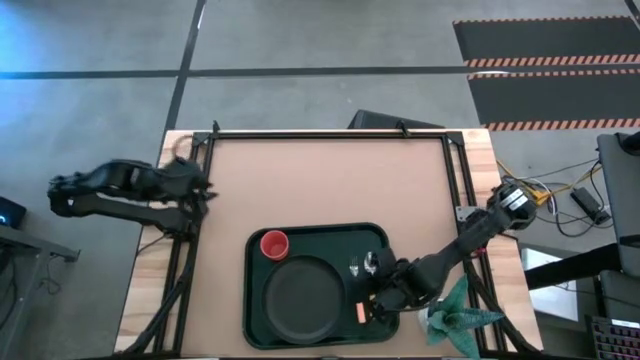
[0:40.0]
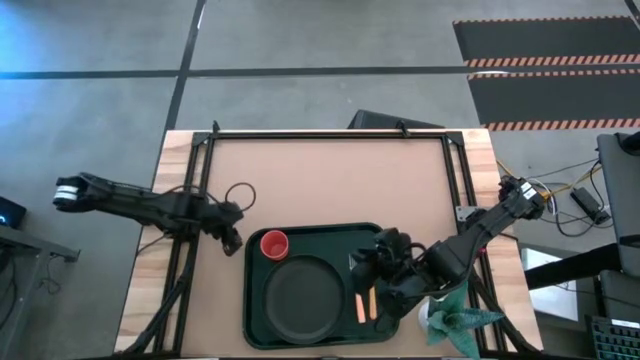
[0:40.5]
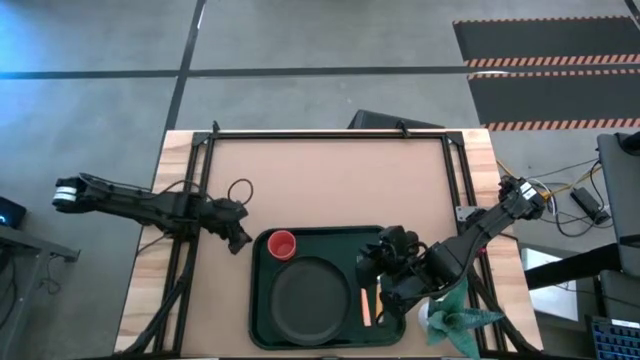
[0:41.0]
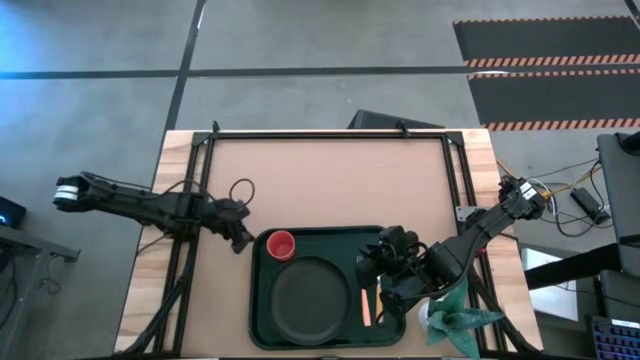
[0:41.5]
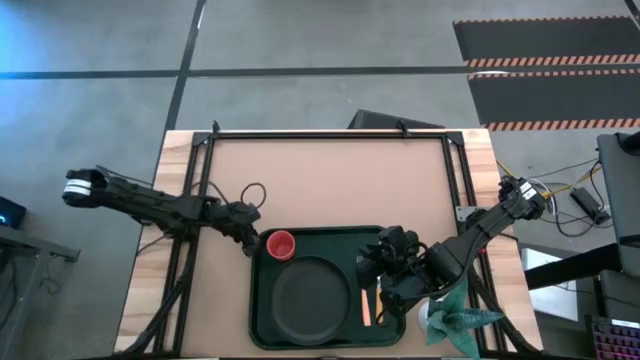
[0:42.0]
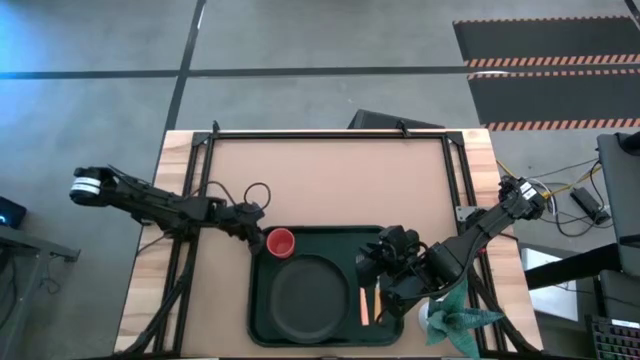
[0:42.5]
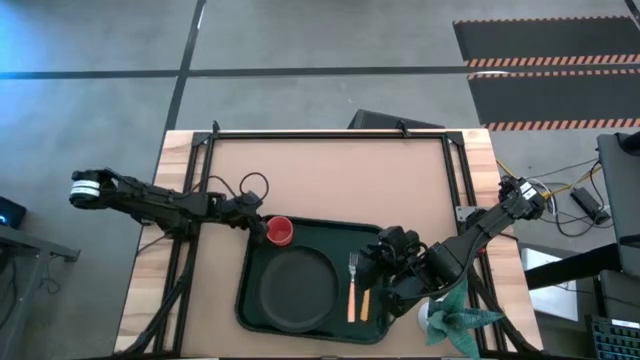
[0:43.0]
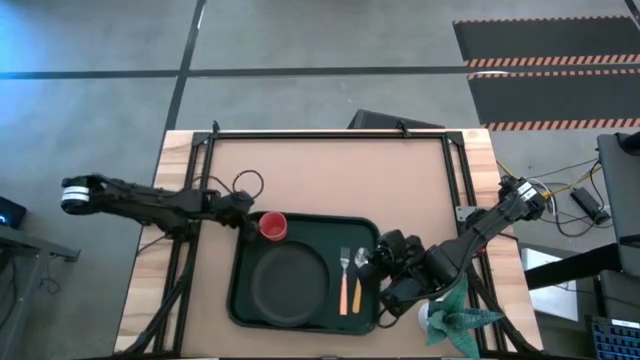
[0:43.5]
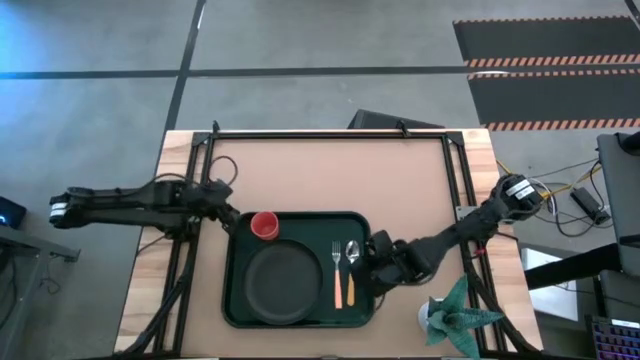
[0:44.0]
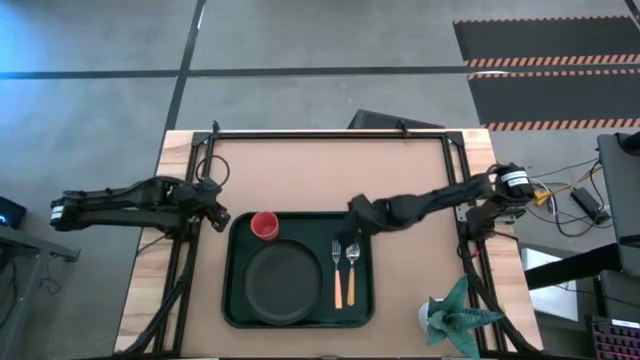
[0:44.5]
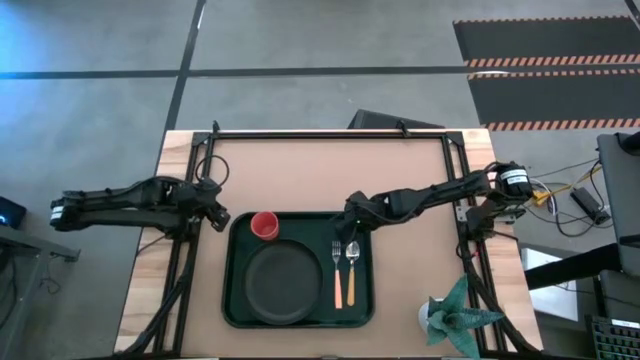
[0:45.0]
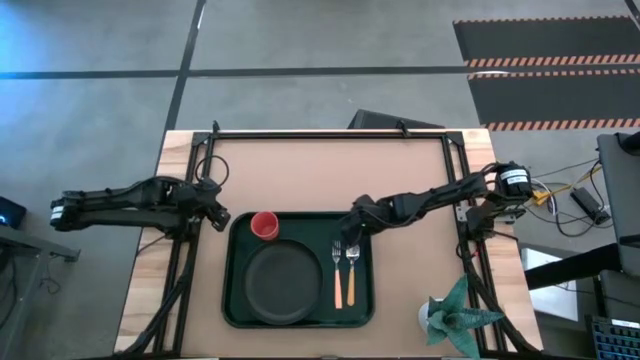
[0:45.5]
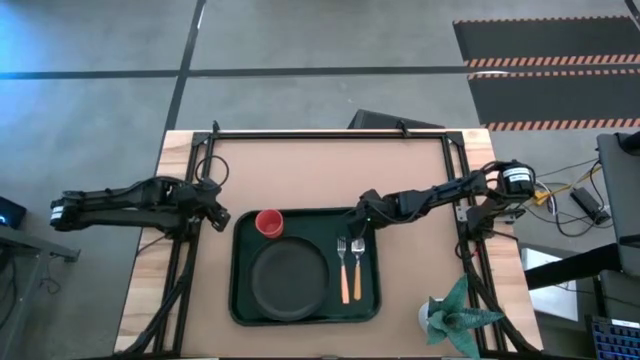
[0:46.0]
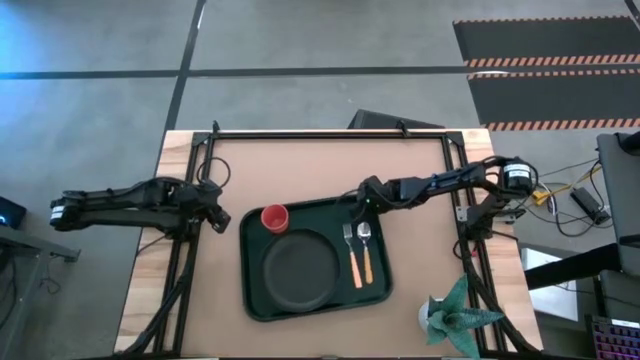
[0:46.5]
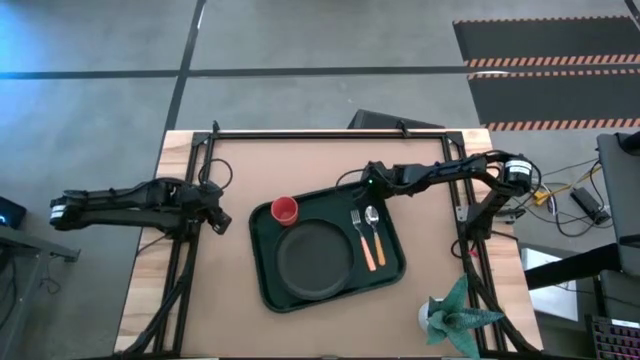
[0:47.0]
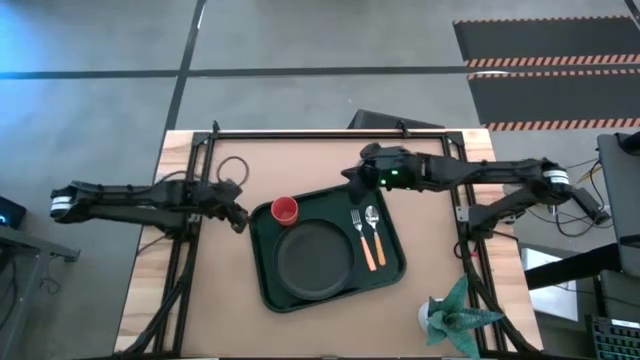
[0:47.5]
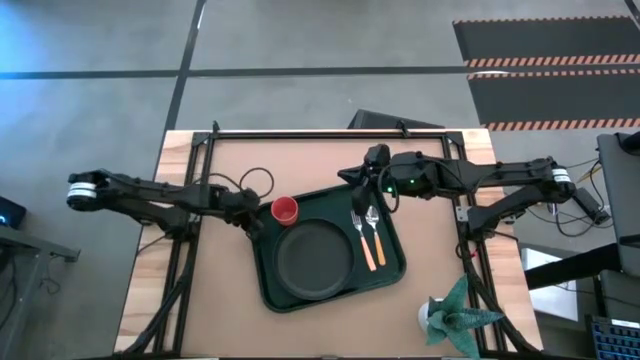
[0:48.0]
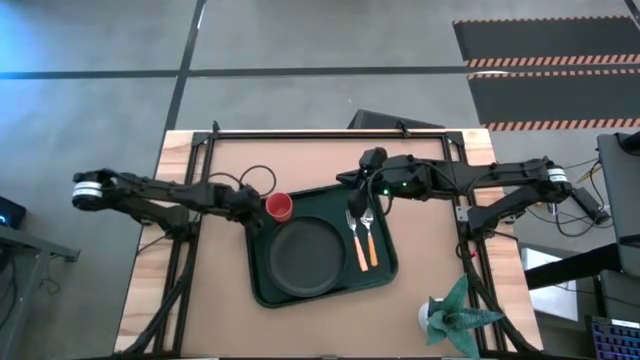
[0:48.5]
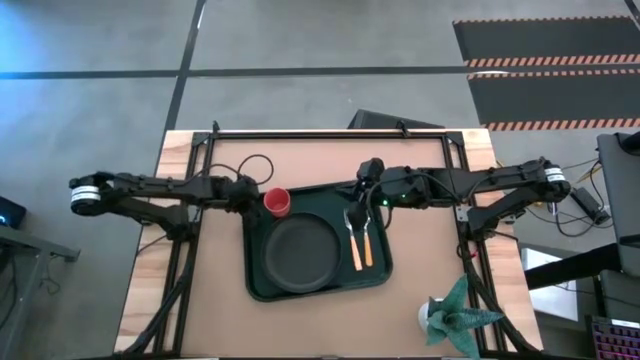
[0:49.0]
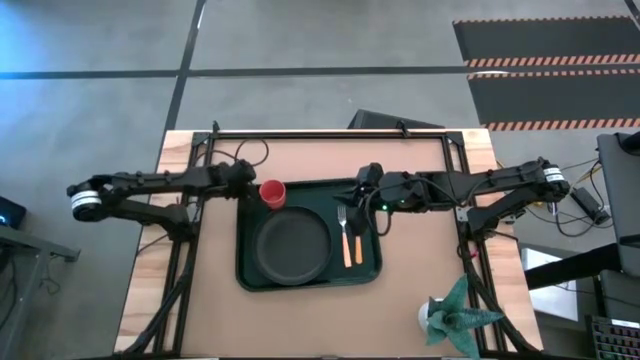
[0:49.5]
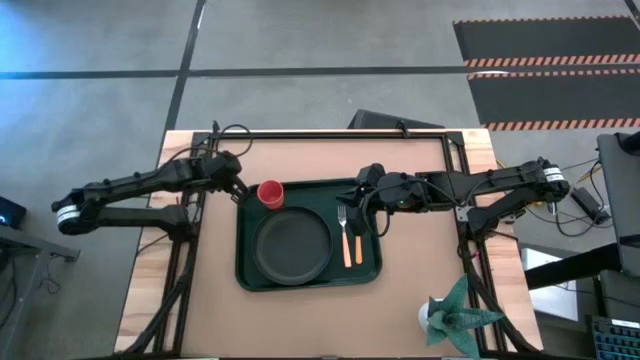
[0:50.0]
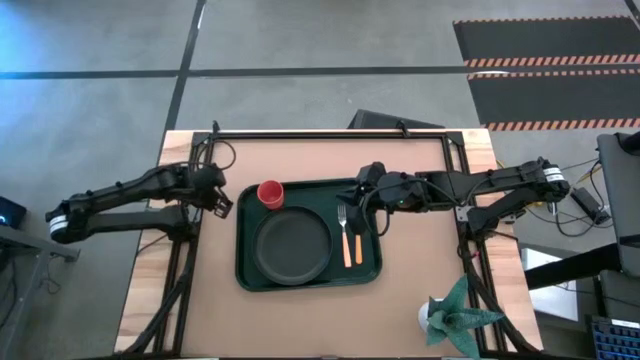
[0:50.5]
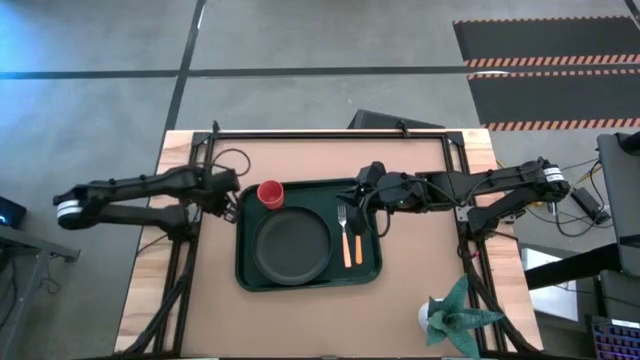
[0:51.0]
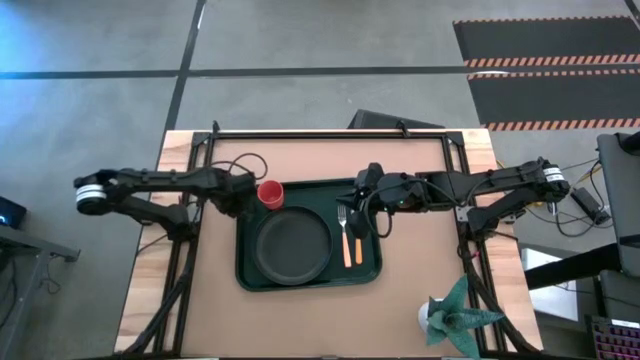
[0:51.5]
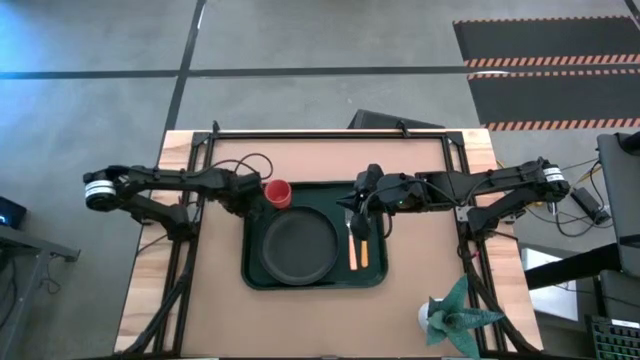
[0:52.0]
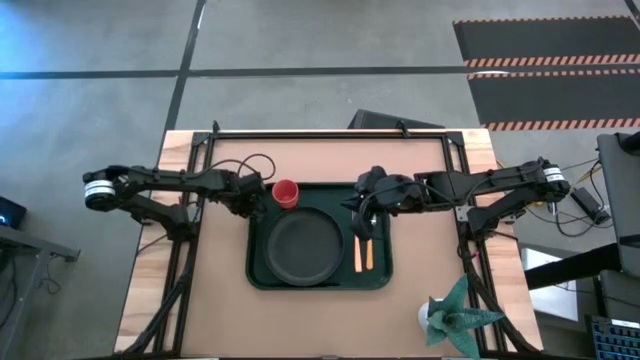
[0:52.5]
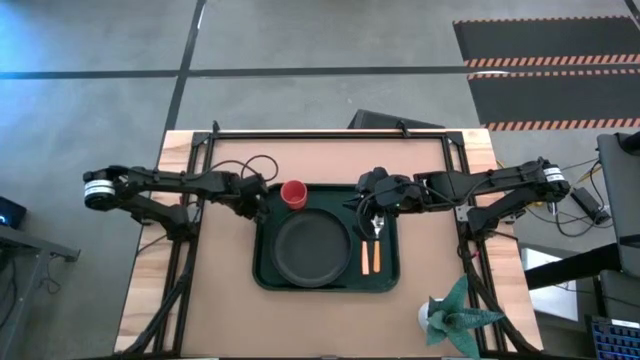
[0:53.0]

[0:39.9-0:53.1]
Task: Pick and place plate/cup/fork/spoon on tray
Move the green table tray to the center

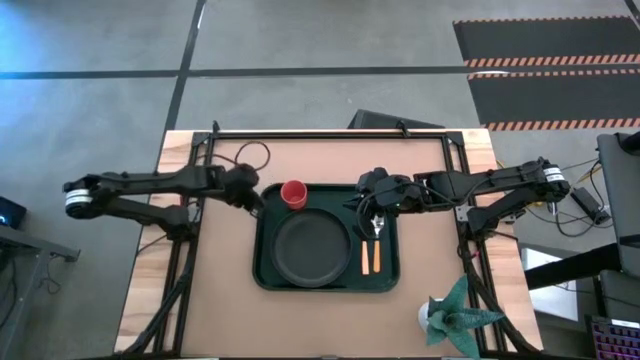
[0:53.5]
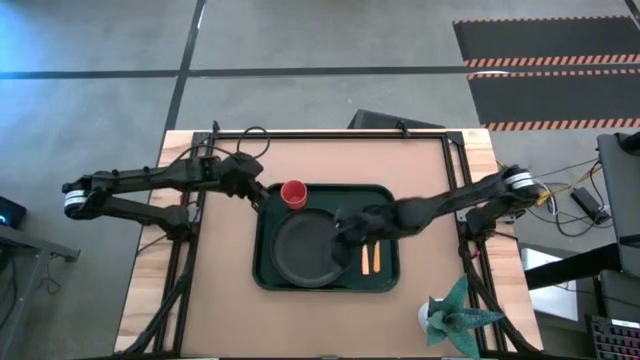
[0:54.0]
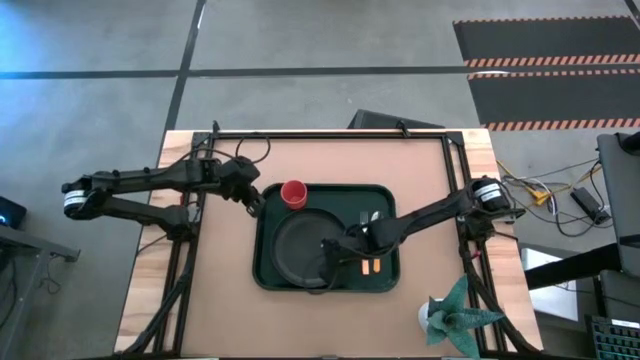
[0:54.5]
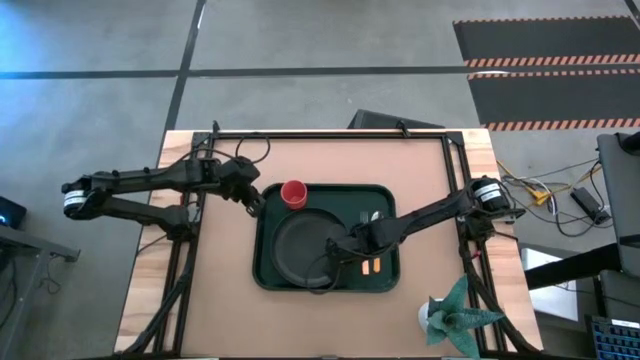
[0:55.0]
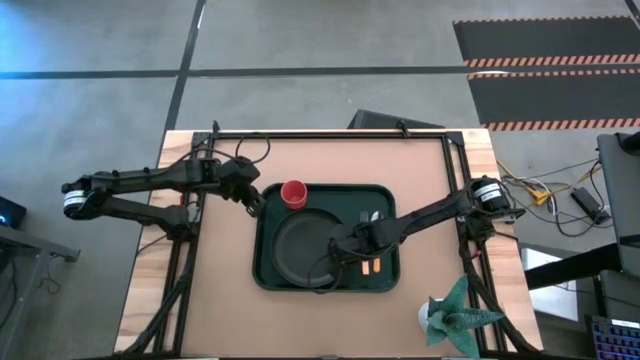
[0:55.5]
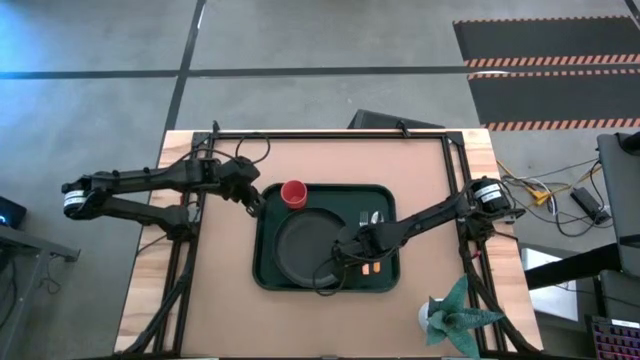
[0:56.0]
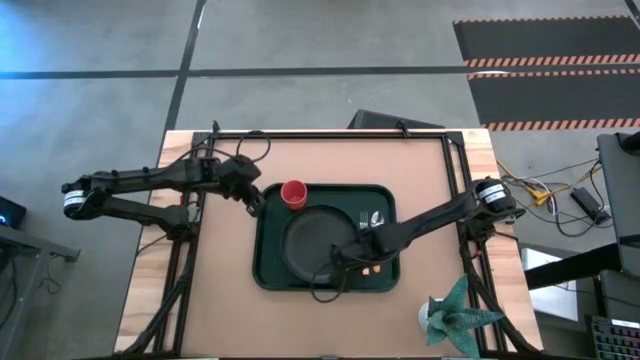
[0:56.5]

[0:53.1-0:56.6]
Adjust the black plate

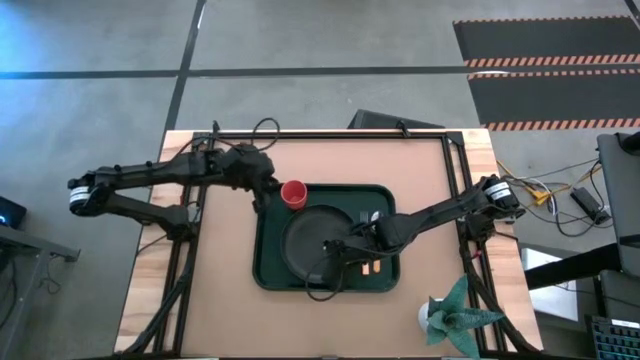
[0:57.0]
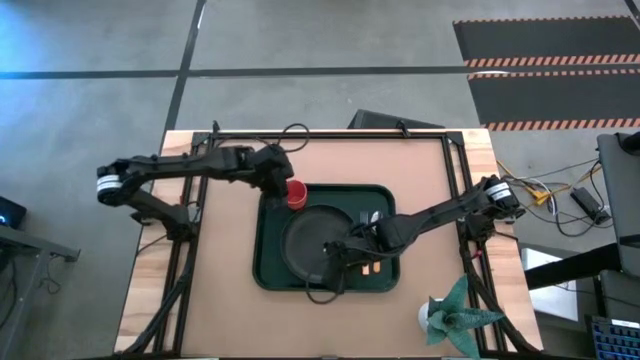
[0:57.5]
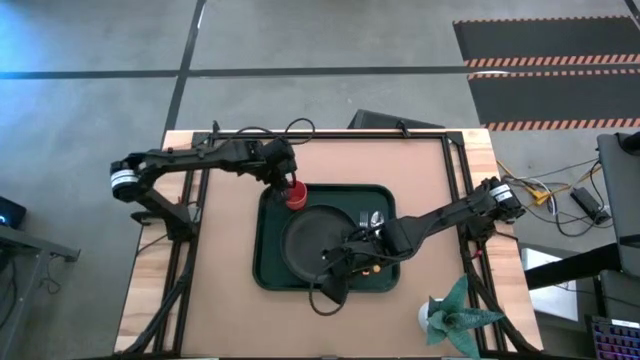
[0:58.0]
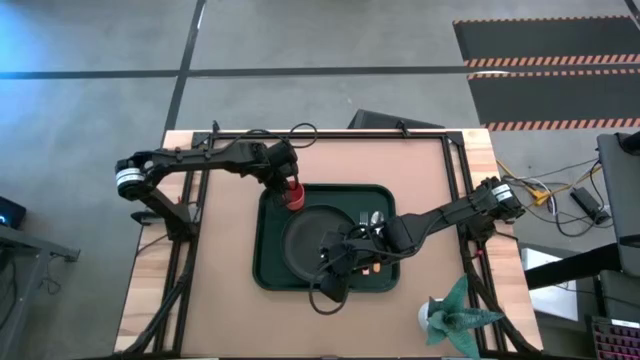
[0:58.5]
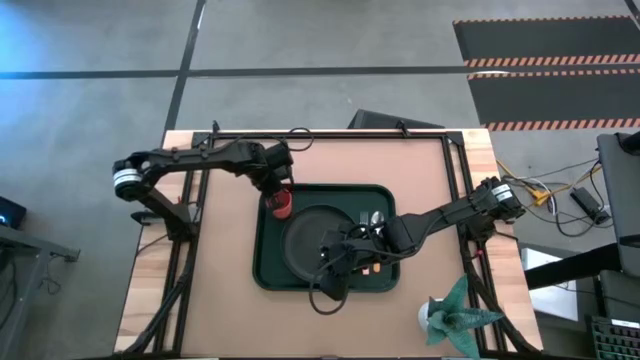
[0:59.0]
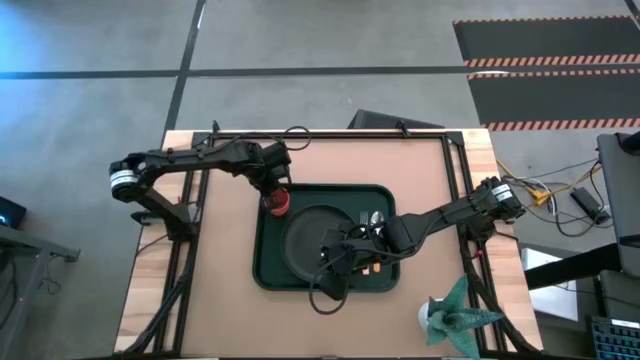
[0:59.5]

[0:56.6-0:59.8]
Adjust the orange cup

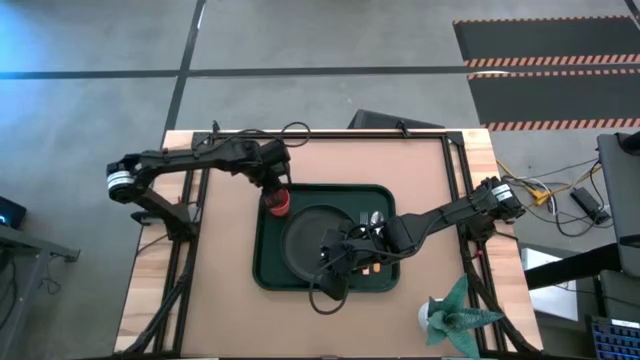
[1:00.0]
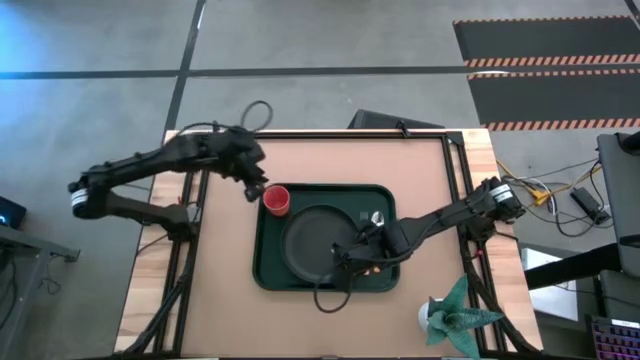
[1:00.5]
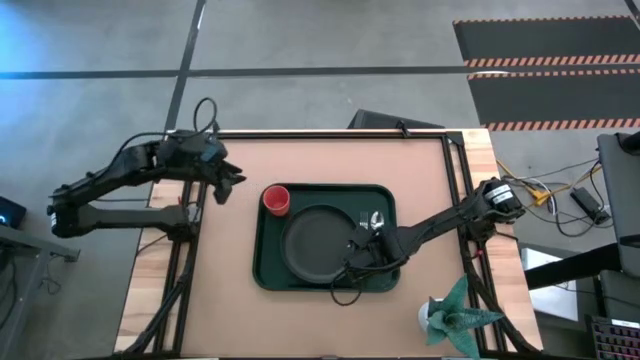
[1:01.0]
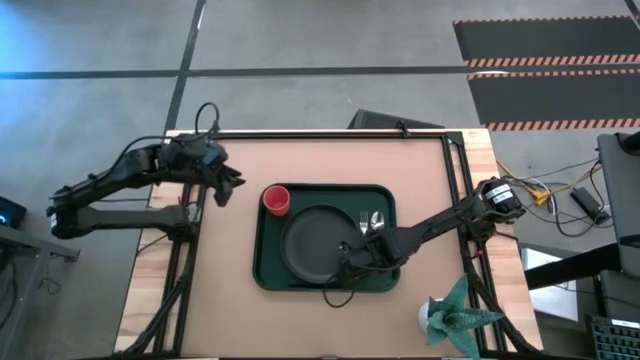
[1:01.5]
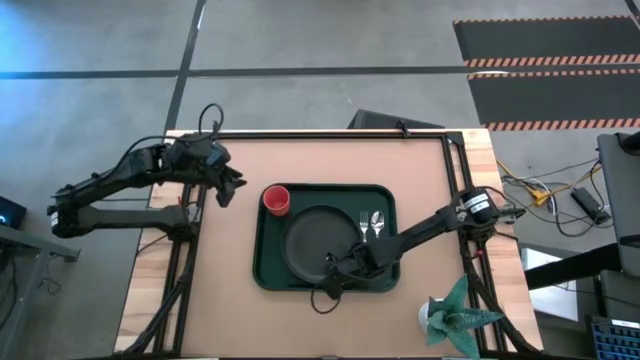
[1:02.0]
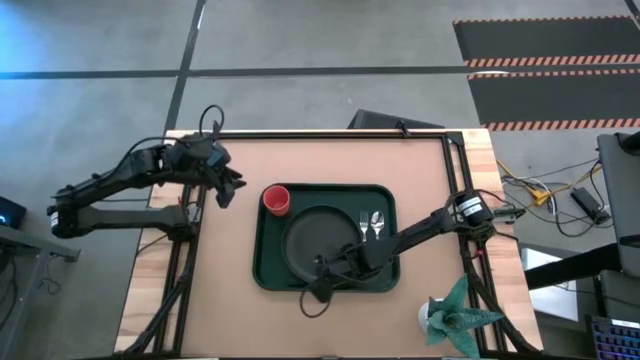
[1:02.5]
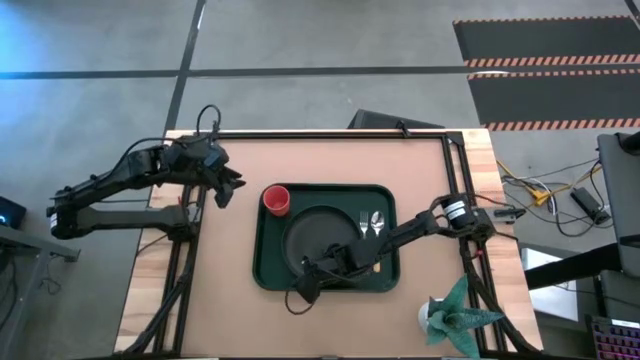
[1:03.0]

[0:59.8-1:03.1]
Adjust the black plate
